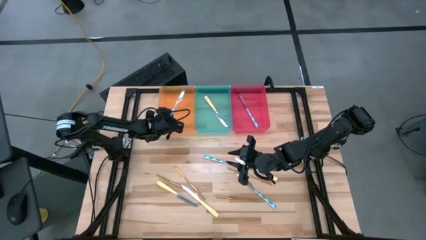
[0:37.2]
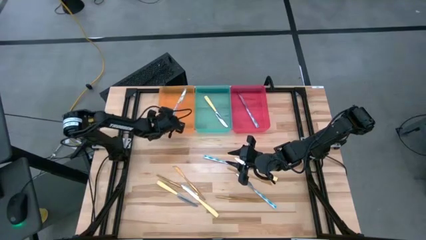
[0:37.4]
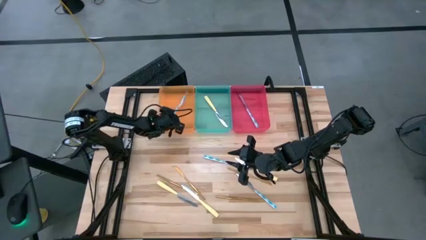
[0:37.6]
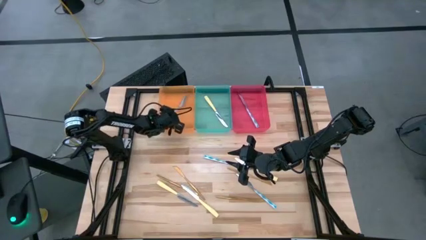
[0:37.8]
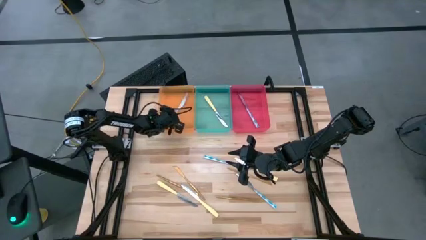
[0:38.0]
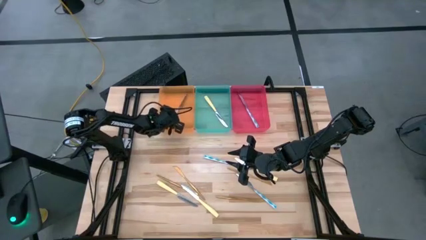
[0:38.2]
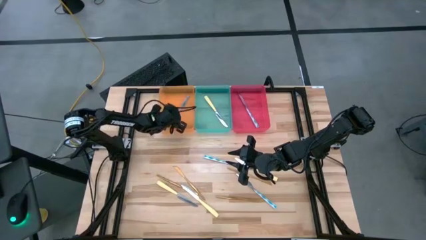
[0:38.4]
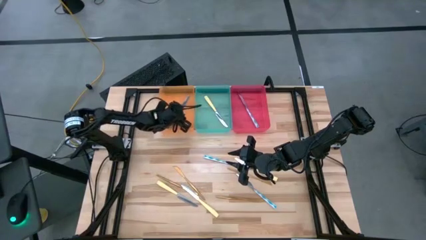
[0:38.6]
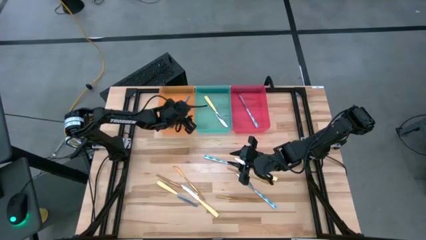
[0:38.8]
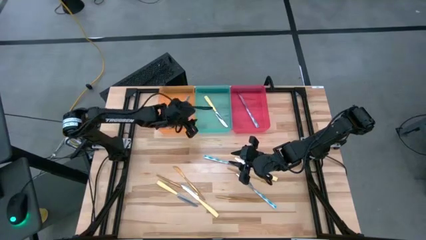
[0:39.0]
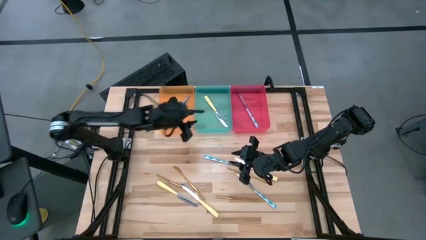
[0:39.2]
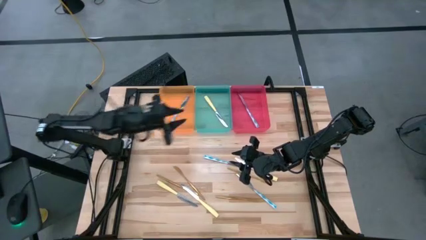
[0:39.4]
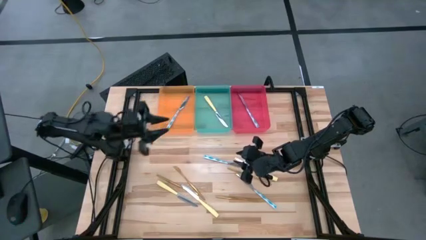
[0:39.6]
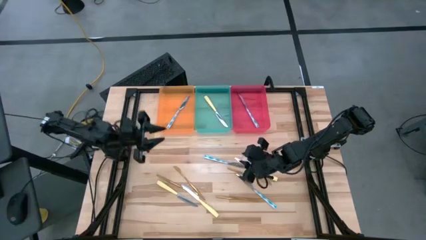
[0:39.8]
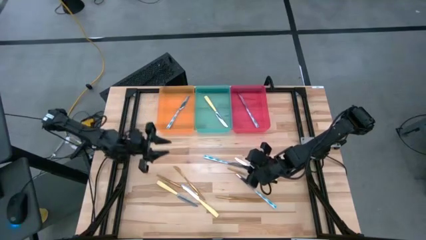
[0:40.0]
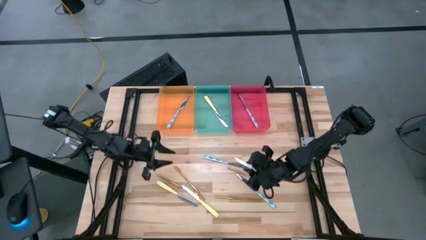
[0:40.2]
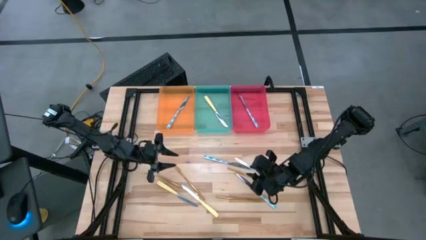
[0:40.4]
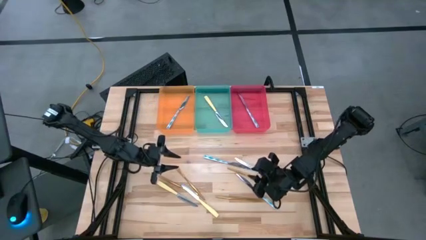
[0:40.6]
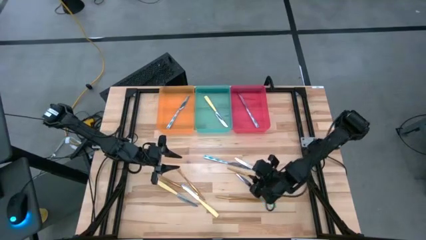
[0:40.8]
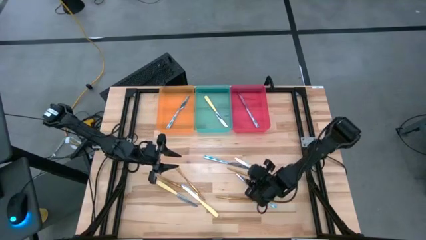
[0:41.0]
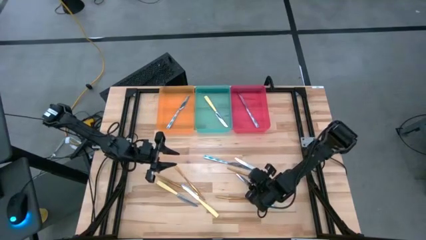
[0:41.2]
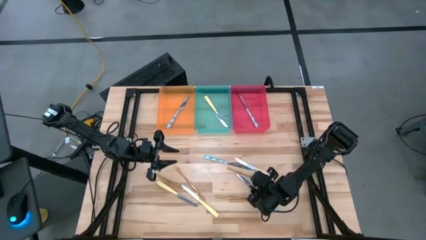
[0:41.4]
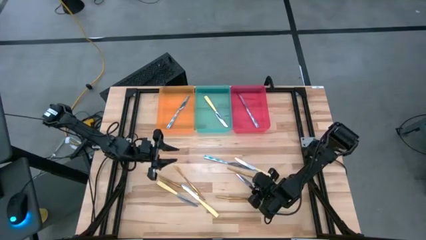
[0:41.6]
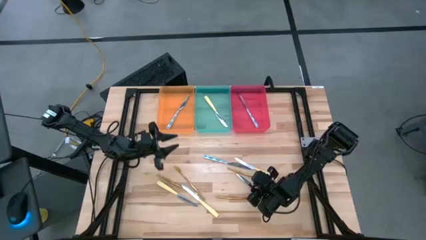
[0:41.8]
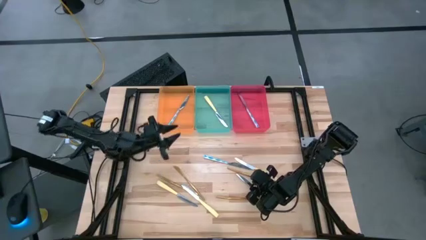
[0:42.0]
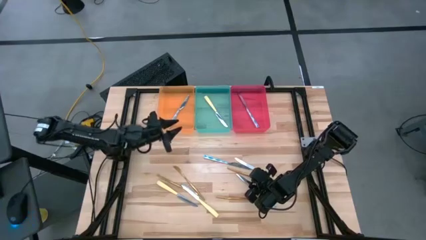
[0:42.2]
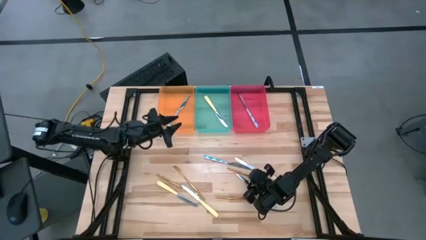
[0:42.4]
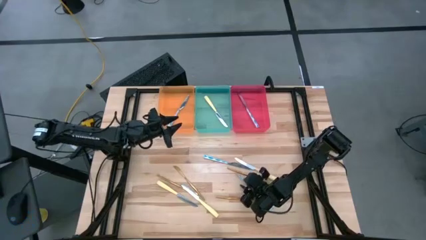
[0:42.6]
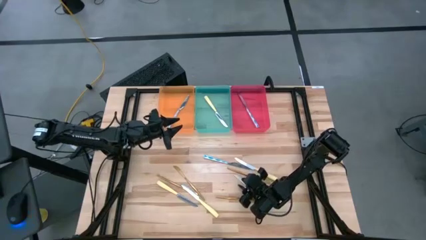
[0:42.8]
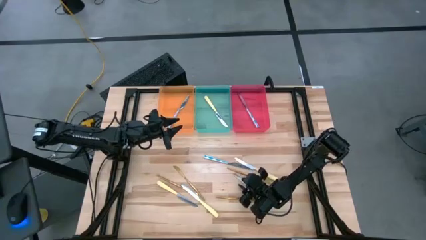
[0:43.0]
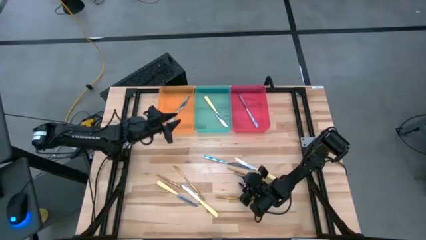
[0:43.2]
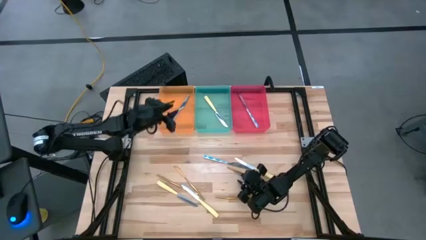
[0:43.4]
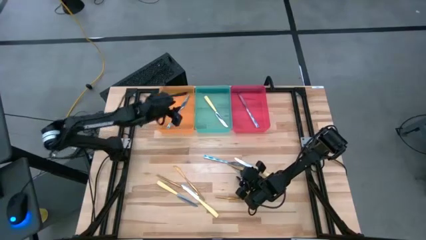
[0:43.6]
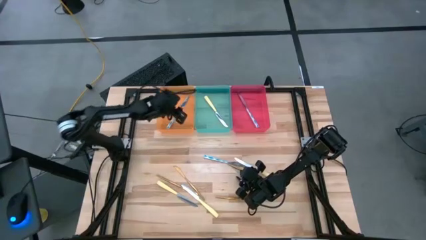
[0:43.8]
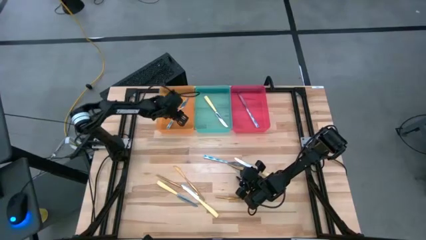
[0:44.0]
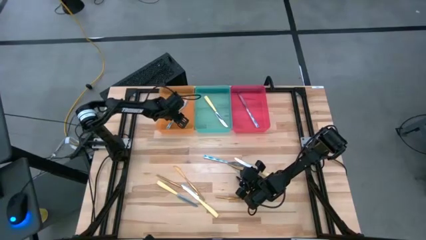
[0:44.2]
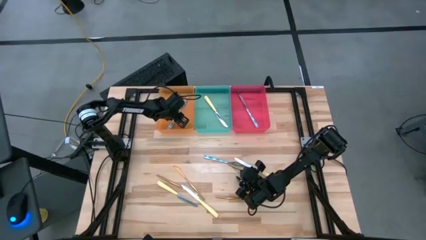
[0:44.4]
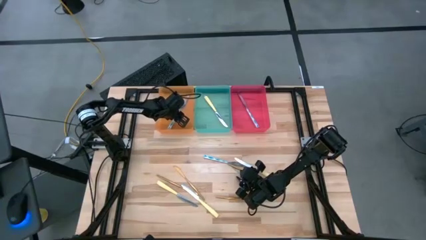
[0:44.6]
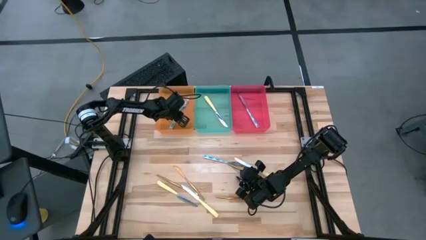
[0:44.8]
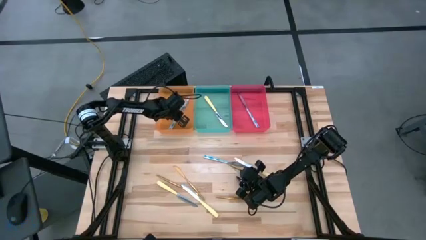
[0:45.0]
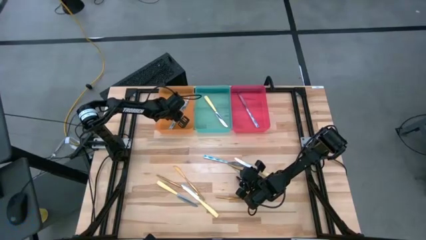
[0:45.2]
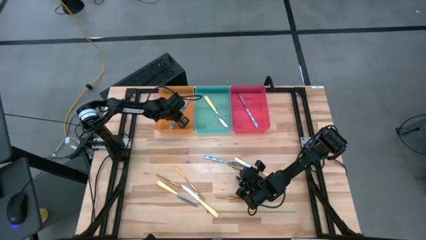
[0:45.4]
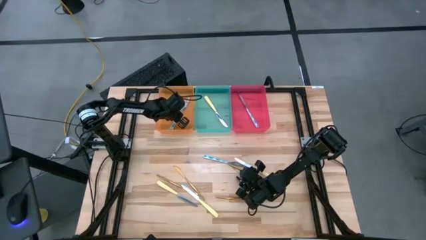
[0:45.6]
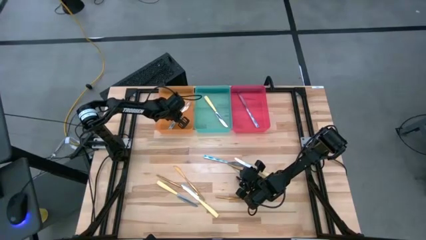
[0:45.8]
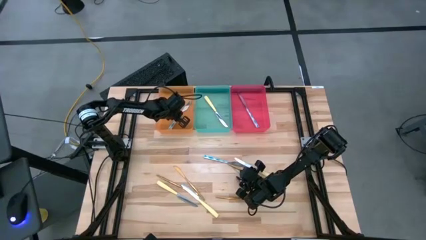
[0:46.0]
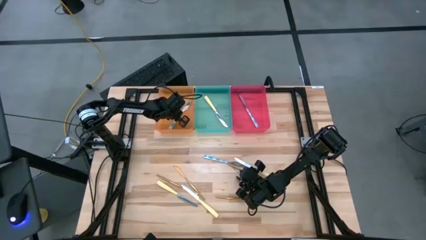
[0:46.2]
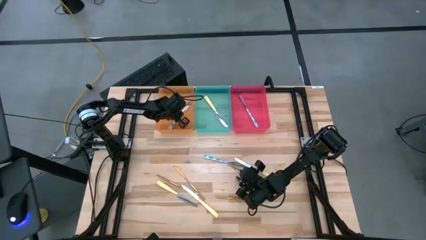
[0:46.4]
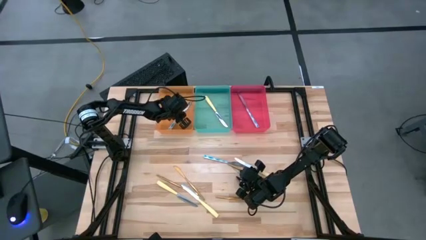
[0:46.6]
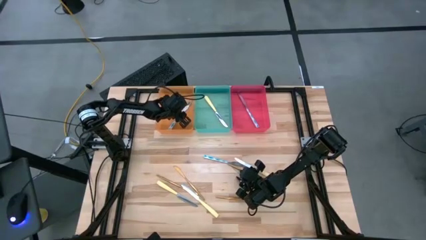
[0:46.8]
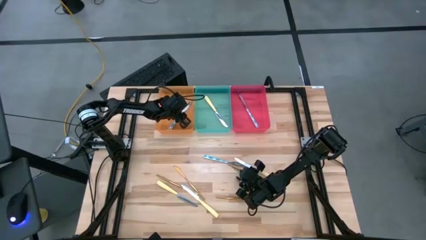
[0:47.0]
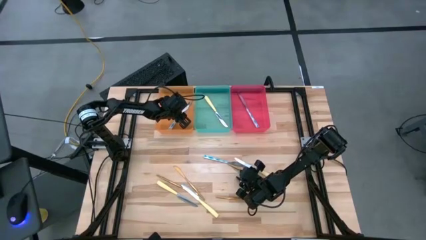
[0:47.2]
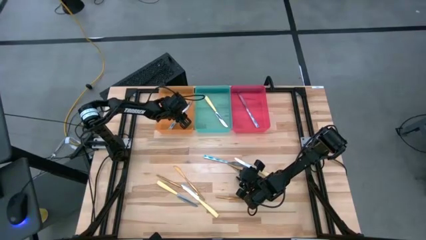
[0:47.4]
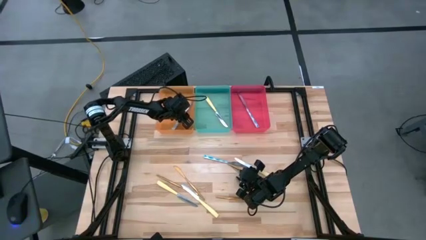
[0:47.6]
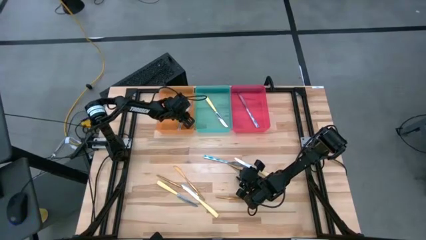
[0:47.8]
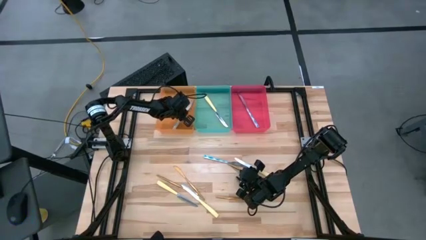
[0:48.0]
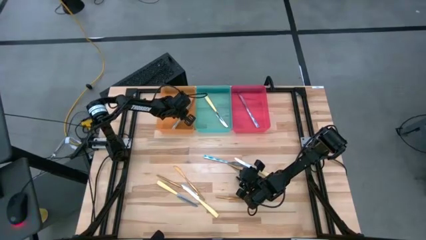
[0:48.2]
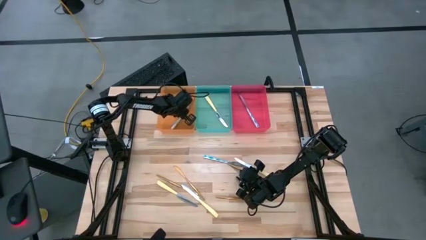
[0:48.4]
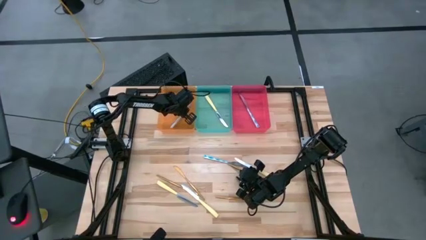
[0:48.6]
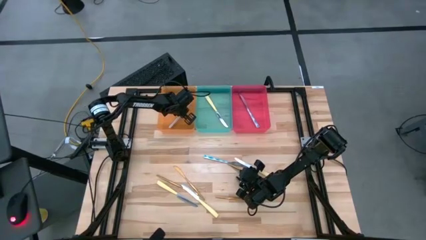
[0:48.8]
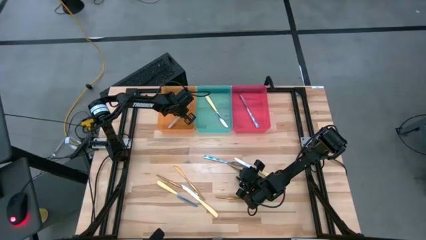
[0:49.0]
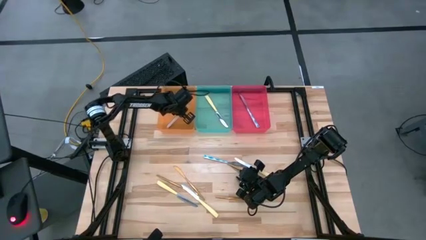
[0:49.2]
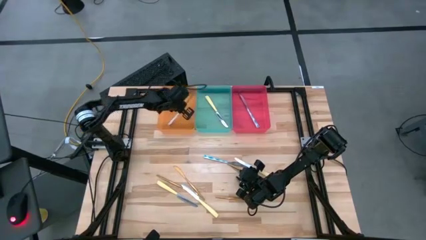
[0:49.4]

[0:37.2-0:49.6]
Task: Sort silverware by color (type)
Put the blue patterned table knife into the red bin

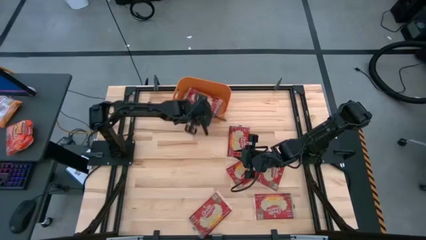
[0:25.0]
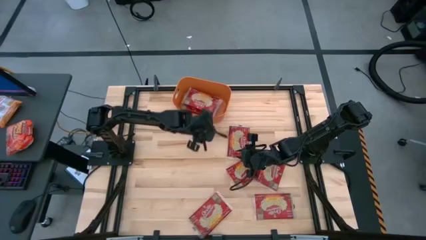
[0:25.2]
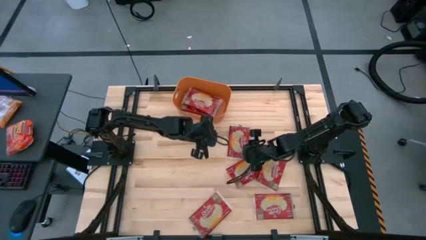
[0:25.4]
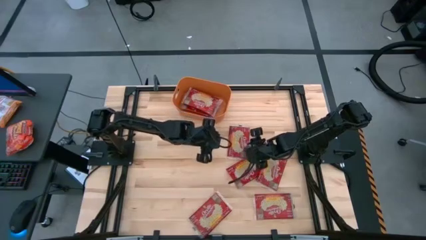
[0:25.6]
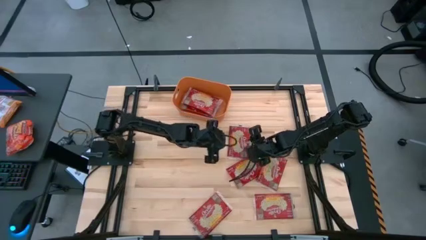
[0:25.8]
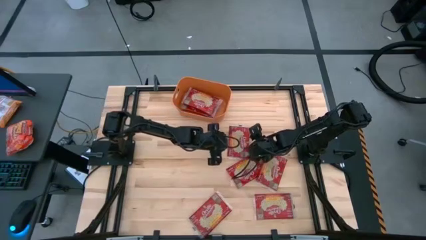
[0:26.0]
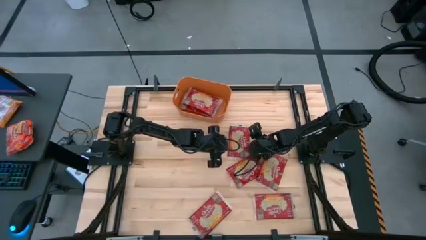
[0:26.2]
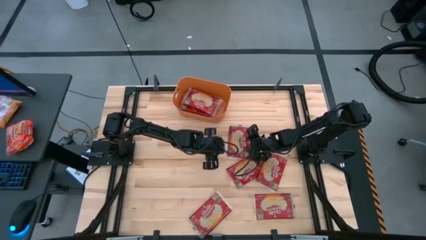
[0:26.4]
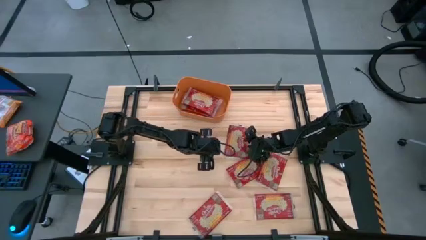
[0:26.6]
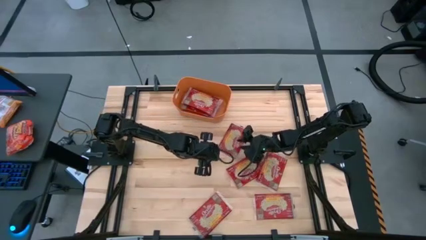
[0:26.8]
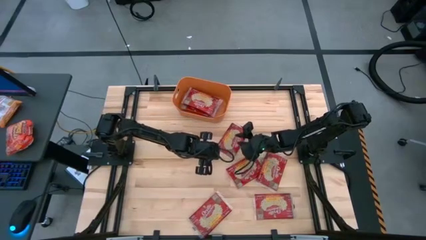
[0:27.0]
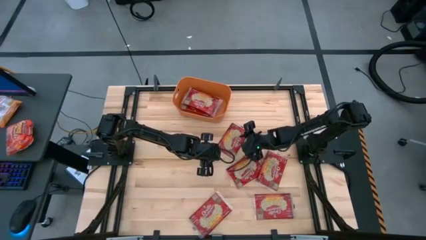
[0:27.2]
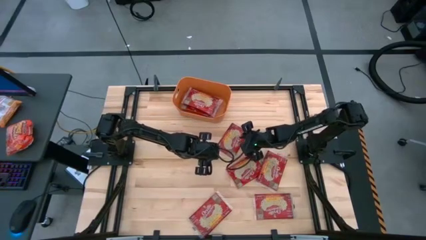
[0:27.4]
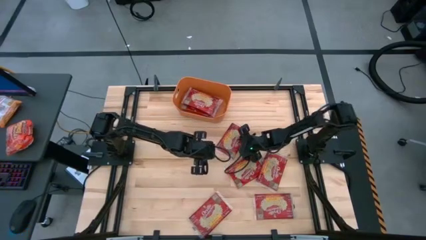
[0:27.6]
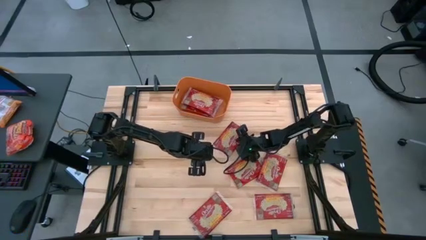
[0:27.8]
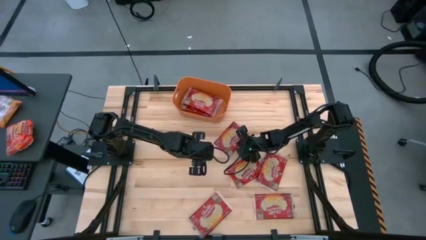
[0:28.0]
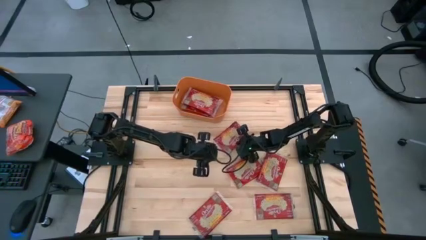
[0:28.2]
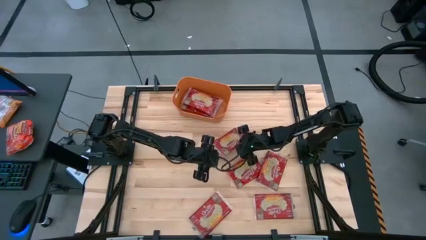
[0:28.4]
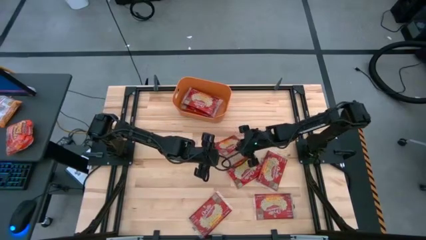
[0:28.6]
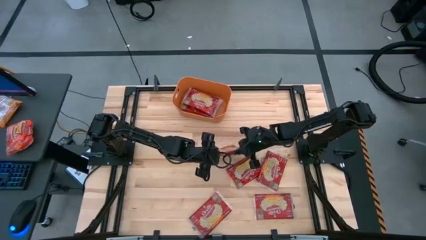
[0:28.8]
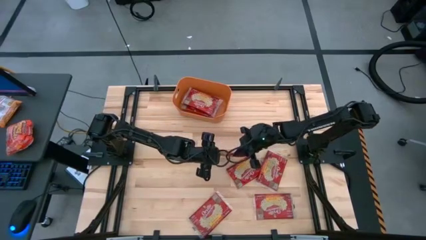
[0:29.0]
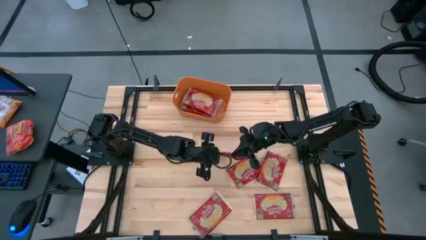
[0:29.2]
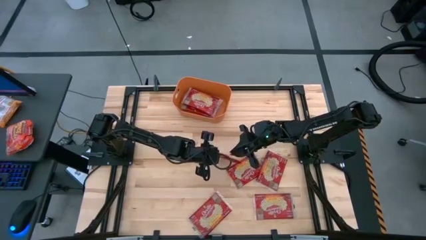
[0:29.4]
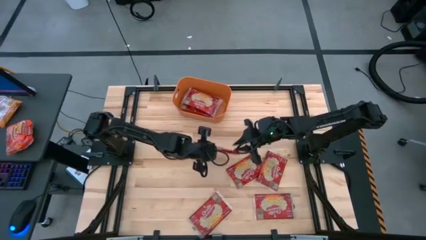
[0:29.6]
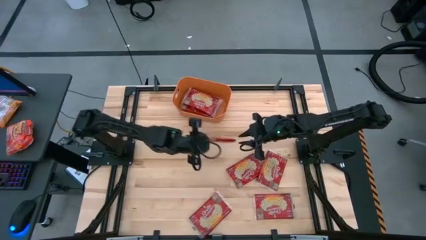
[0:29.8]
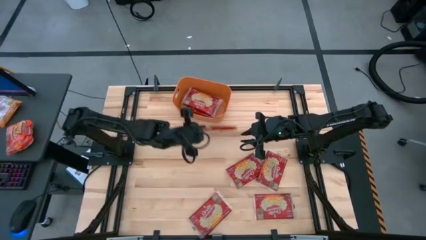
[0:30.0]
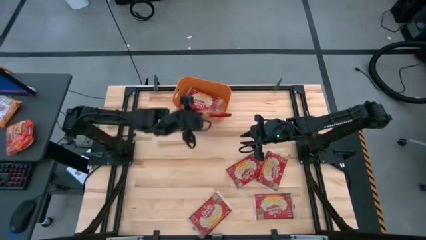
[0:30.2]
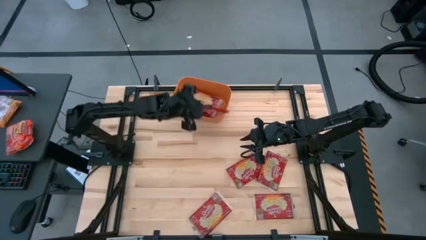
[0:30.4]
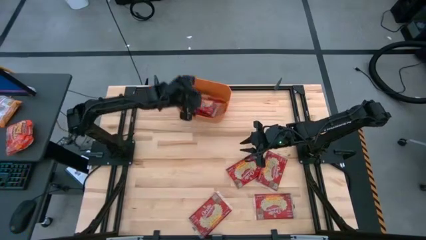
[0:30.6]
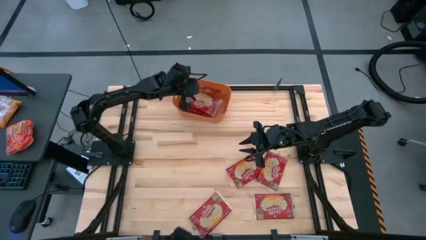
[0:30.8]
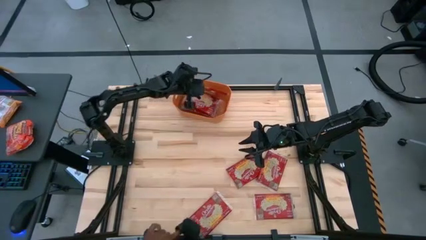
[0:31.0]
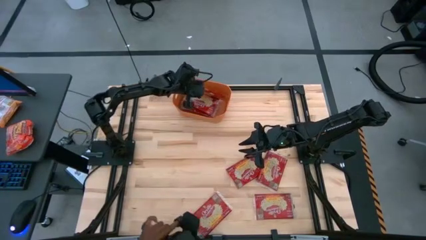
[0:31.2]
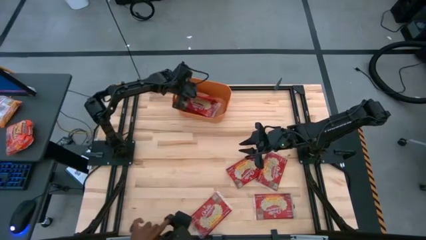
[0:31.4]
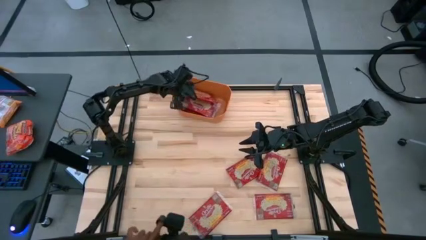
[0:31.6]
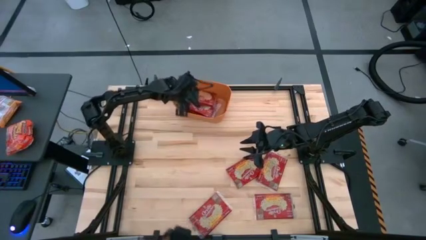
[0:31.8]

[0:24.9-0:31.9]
Task: Sort popcorn bags into baskets
Put the red popcorn bag into the orange bin
